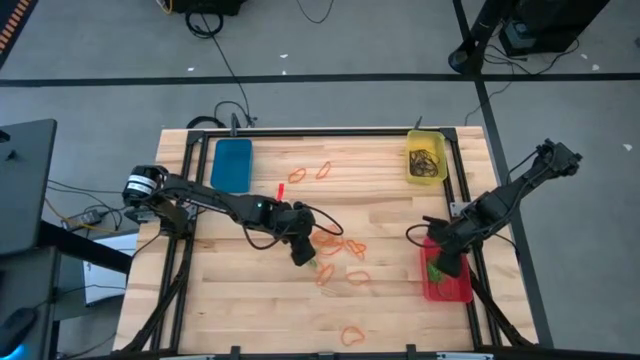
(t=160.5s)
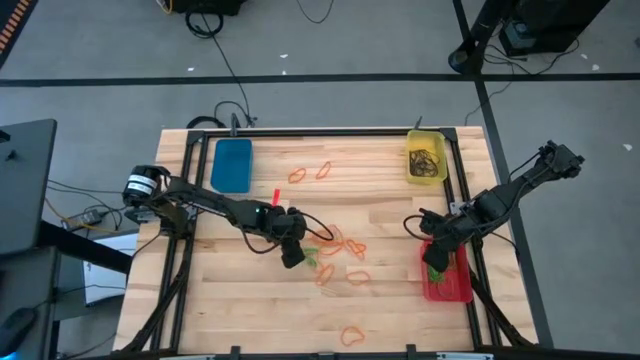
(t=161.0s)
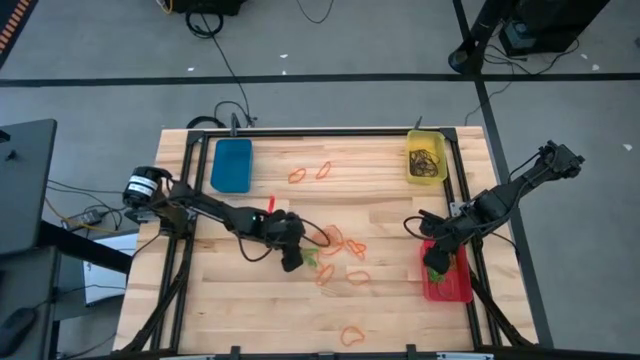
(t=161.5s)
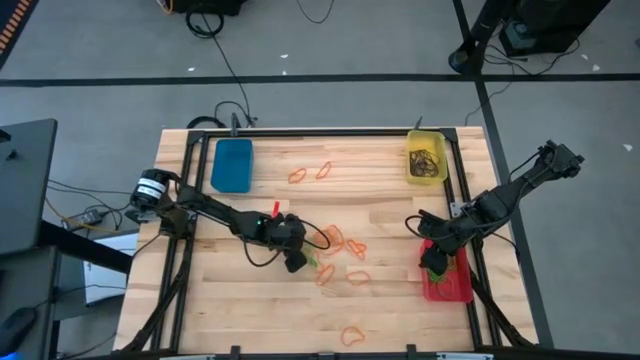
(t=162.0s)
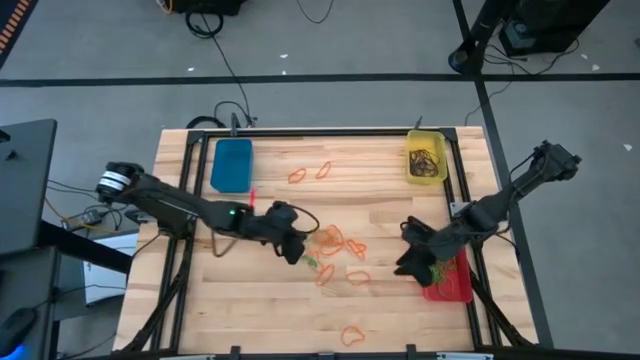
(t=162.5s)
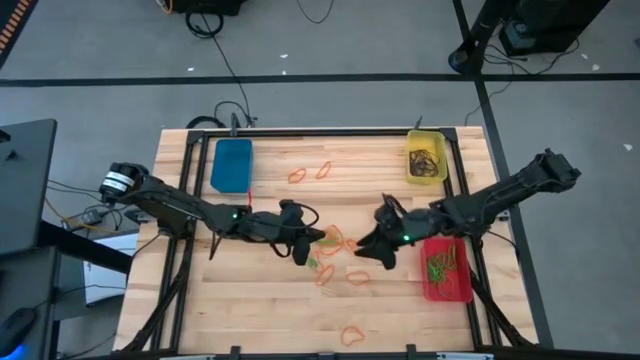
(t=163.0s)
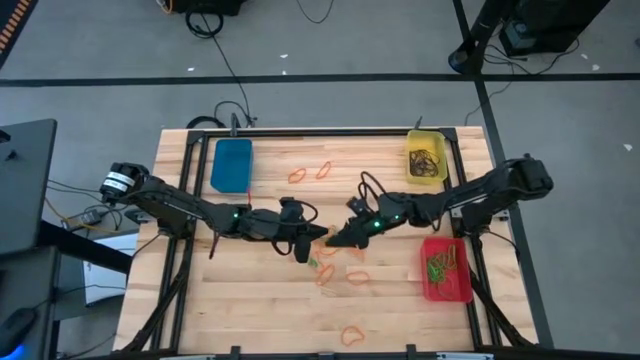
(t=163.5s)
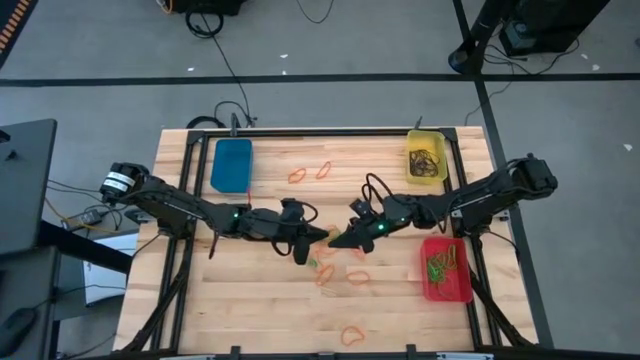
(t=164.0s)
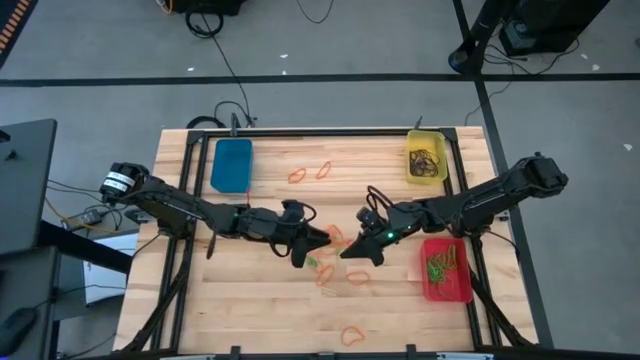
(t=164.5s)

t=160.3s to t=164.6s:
Task: Sort rubber bands into baskets
Put the green rubber band into the red bin

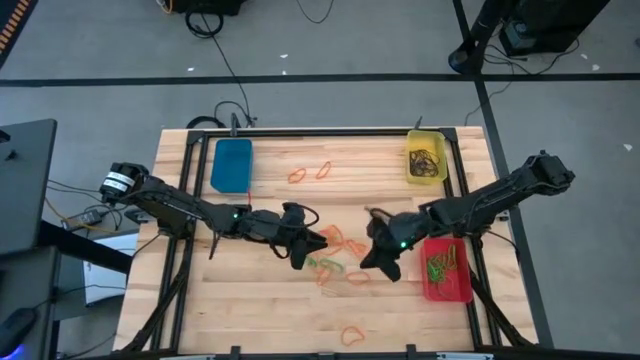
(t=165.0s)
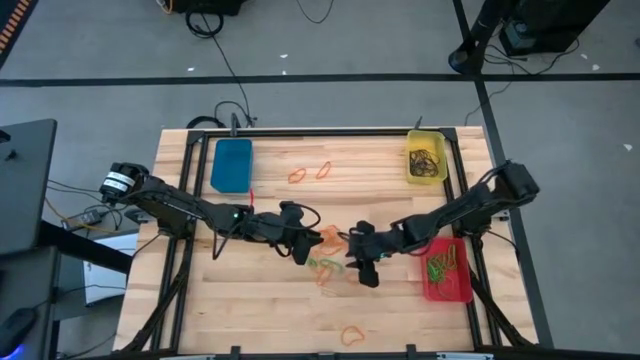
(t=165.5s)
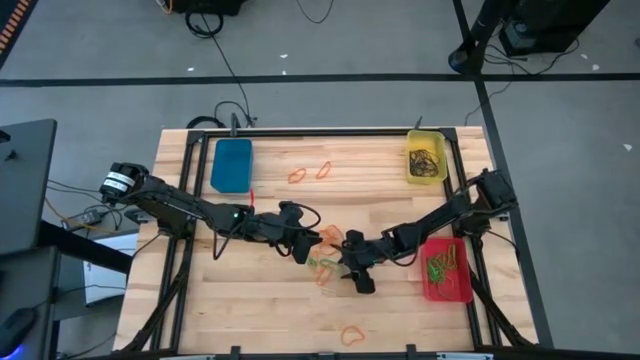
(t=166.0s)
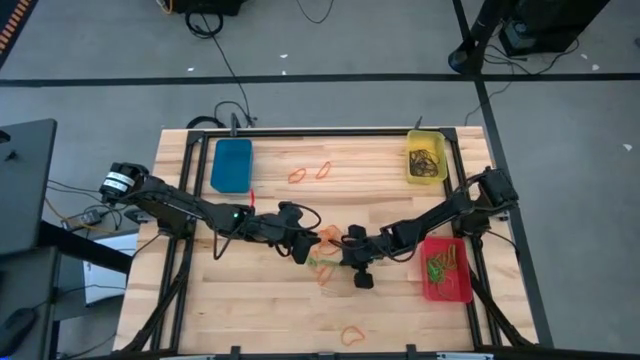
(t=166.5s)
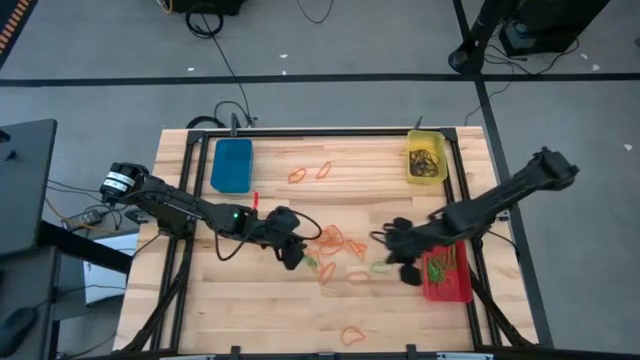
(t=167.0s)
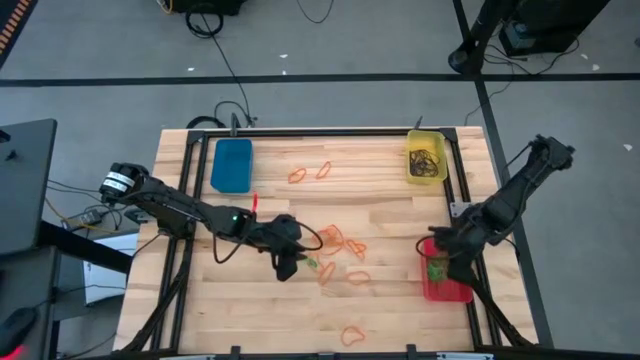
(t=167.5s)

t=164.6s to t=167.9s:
Put the green rubber band into the red bin

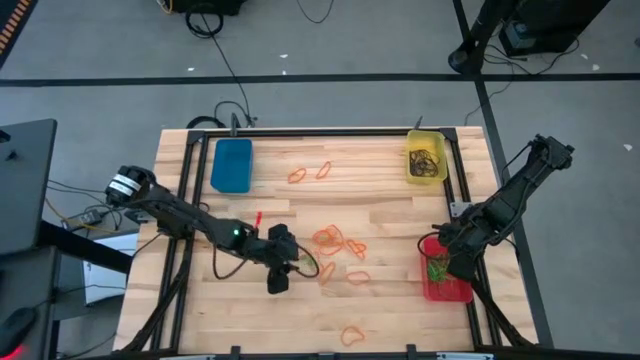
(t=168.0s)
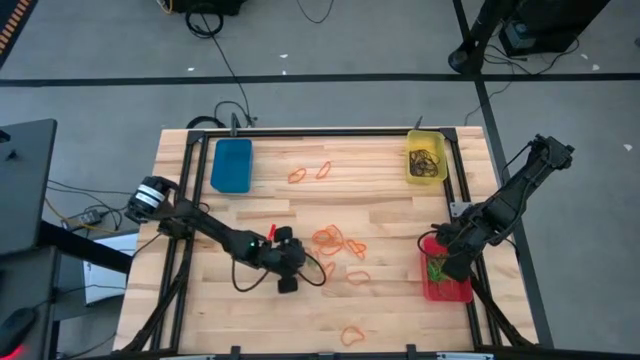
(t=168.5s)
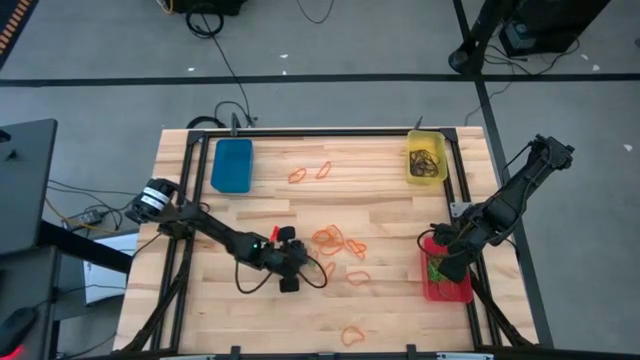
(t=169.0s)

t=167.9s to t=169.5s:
Put the green rubber band into the red bin

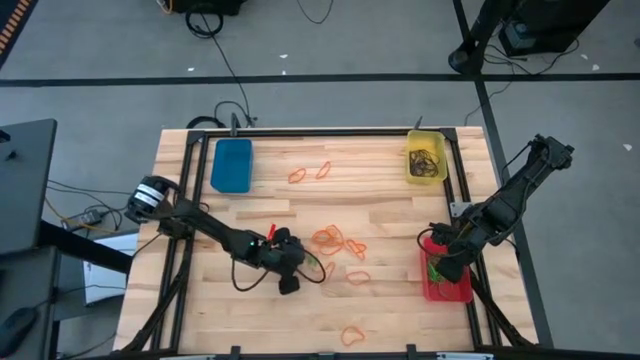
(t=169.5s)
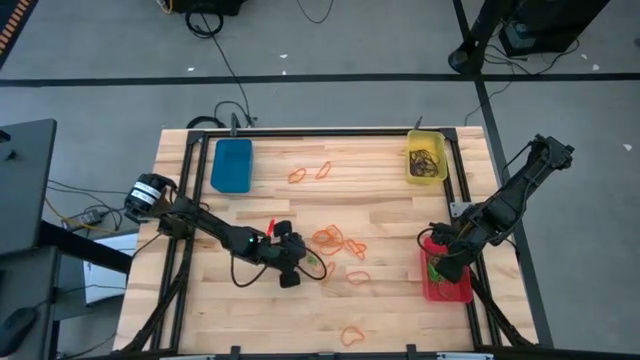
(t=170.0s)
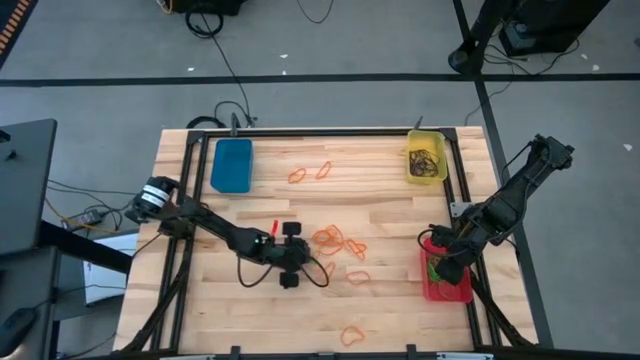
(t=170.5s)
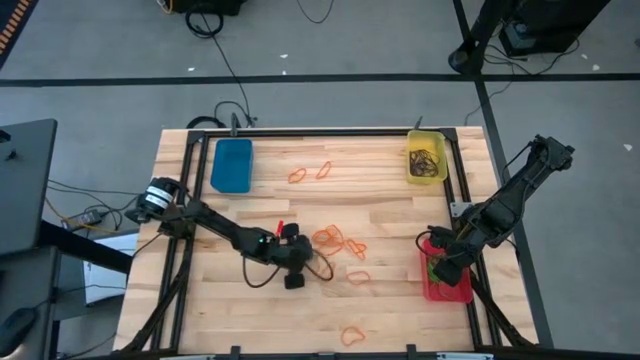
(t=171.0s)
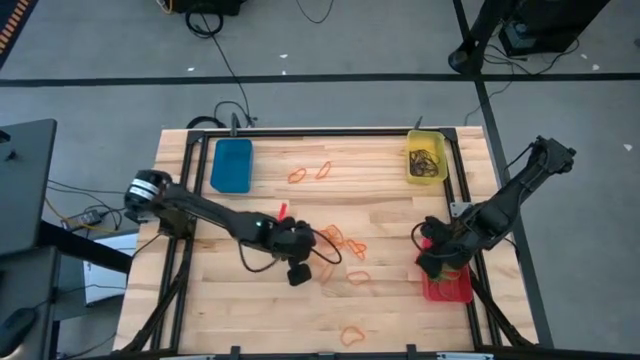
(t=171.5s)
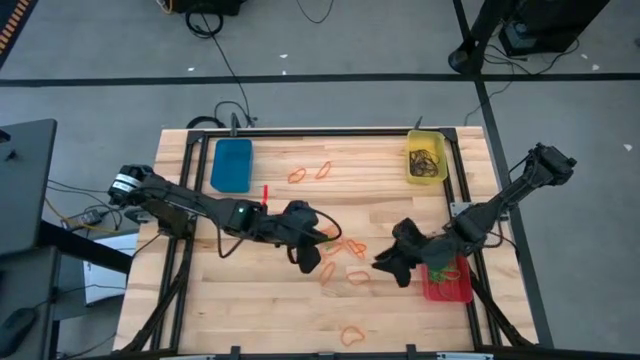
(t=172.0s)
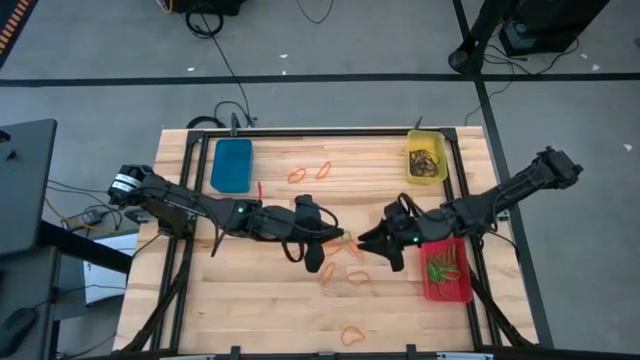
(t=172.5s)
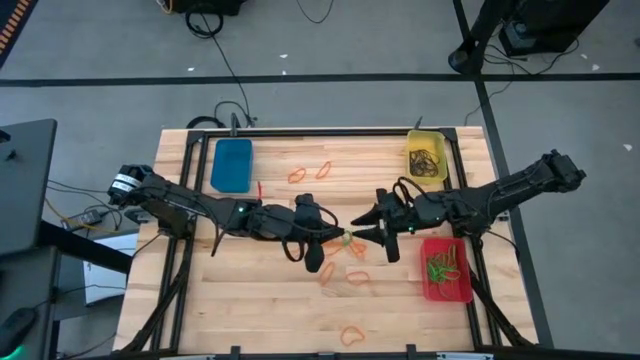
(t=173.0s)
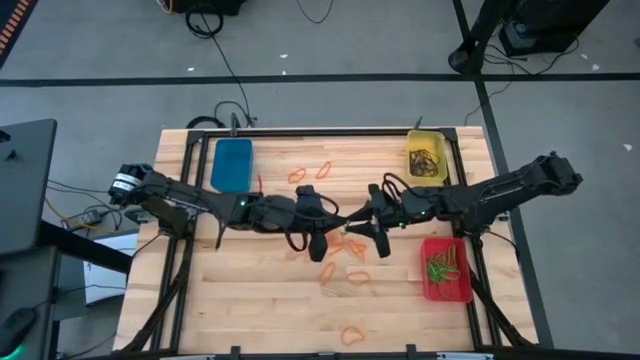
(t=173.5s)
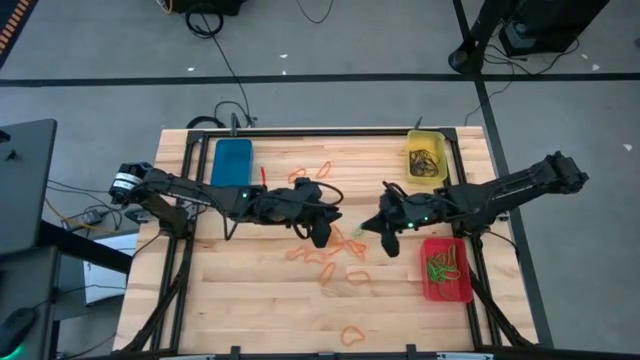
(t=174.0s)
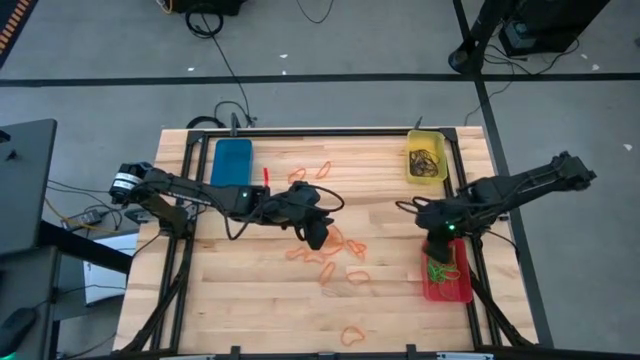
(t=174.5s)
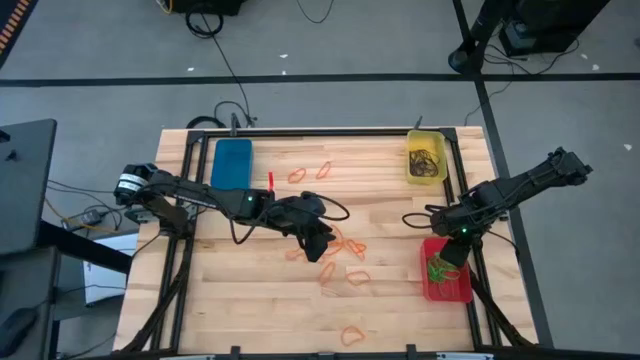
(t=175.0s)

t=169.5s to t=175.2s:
Put the green rubber band into the red bin

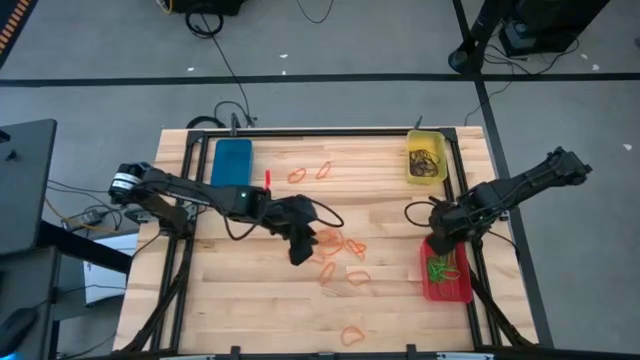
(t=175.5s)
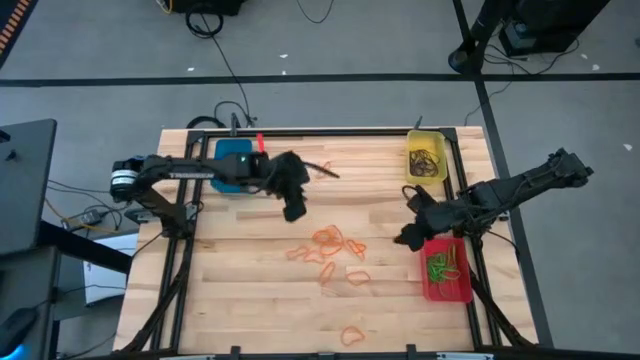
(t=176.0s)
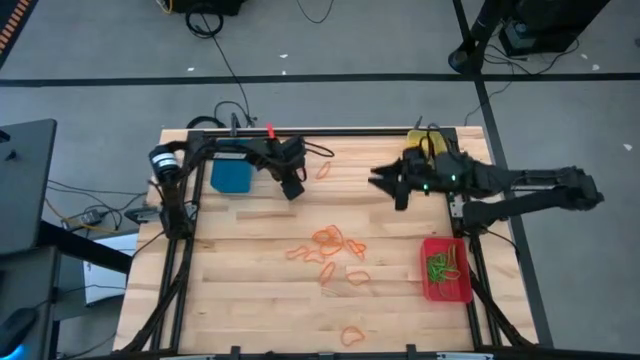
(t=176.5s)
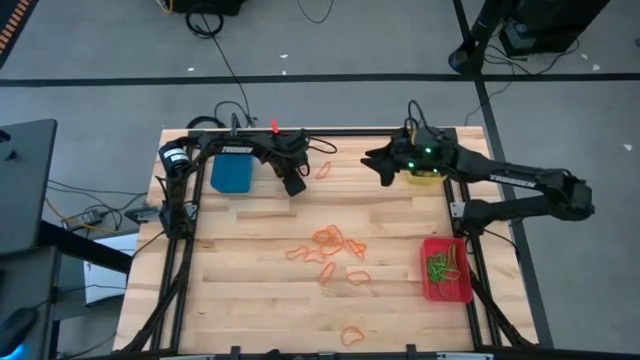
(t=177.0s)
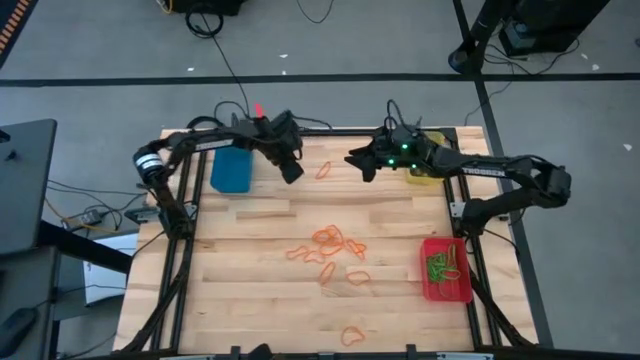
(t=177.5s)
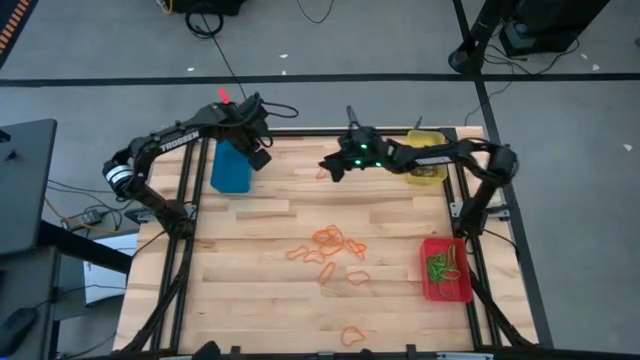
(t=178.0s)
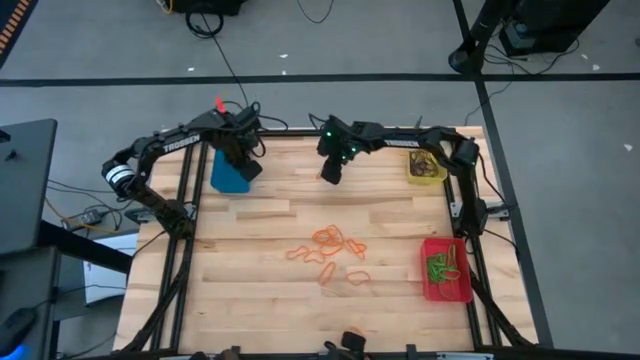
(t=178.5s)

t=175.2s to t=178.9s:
Put the orange rubber band into the blue bin

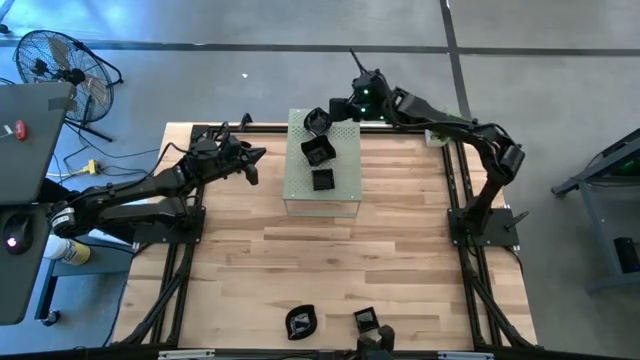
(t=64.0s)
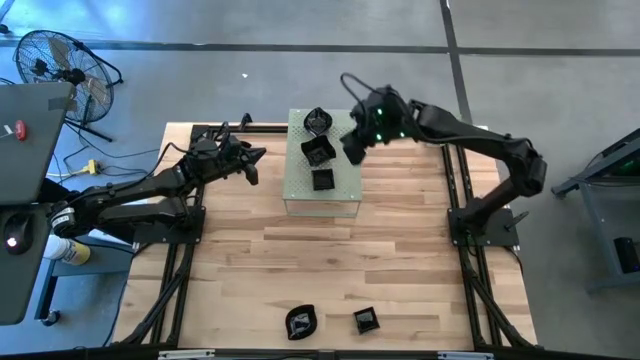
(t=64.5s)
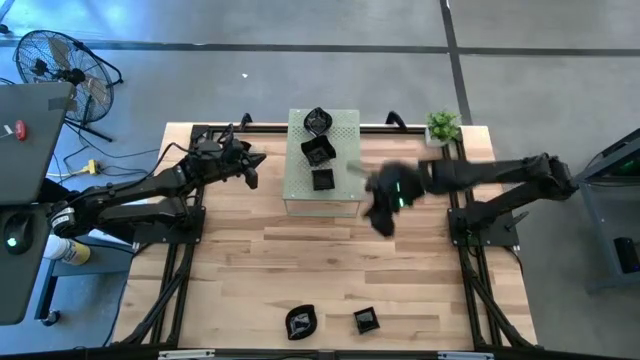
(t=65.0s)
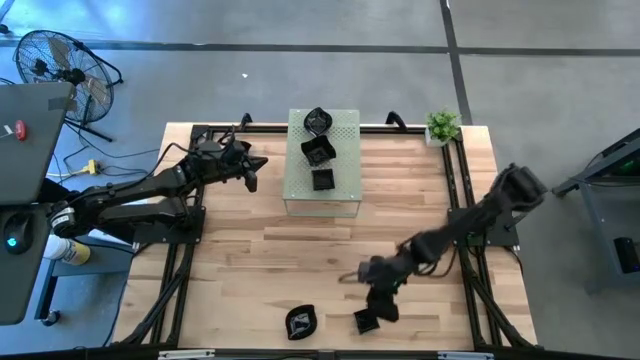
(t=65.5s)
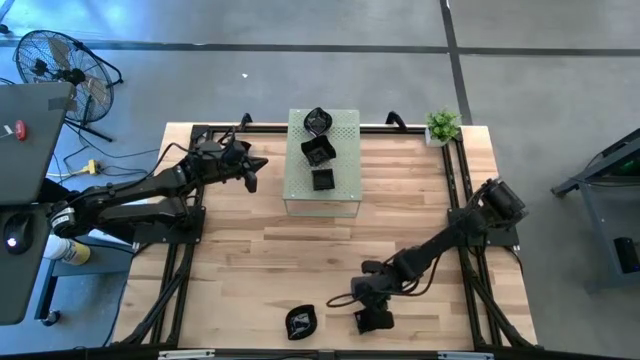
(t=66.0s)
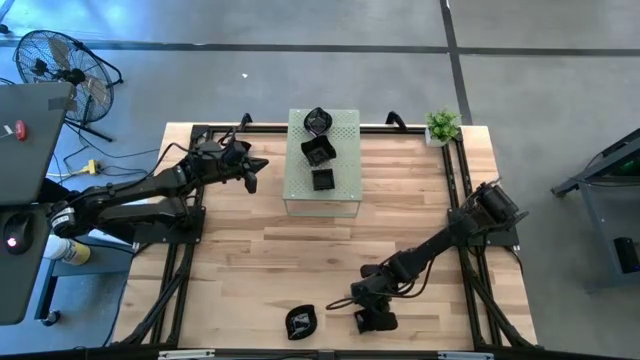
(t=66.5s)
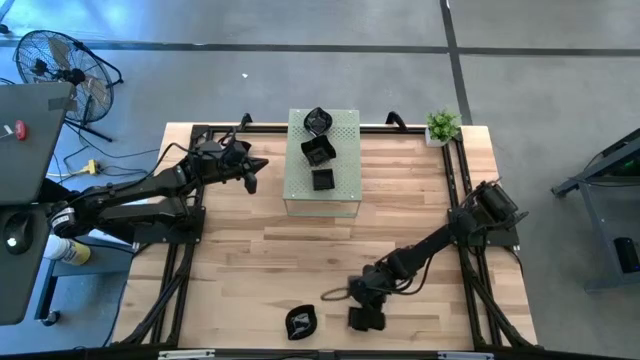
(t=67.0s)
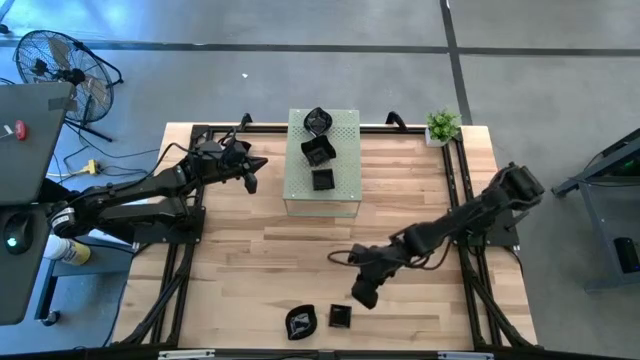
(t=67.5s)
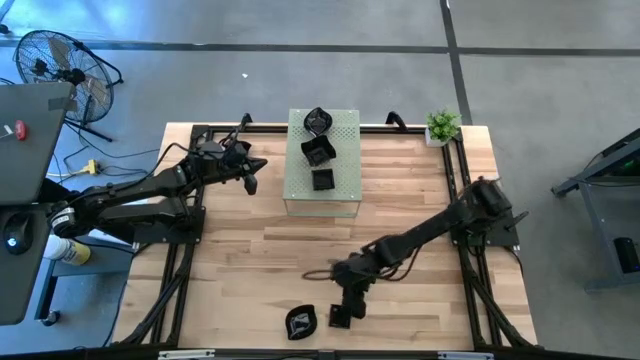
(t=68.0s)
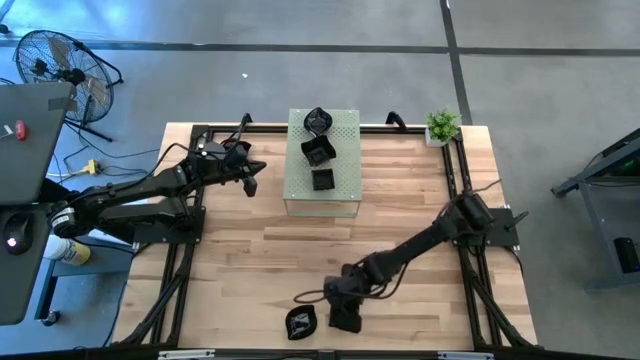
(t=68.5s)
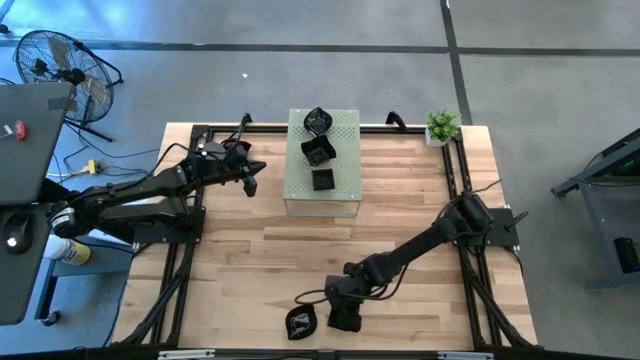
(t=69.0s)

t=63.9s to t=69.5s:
Task: Pick & Place Mini shaped plates
Stack the black square plate on top of the black square plate on the shelf
